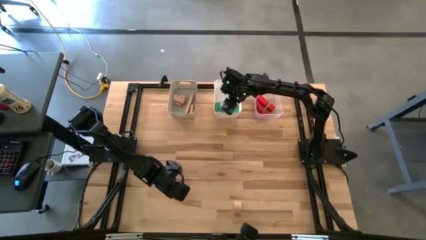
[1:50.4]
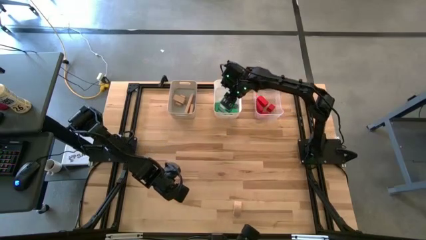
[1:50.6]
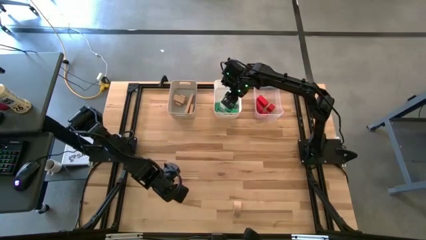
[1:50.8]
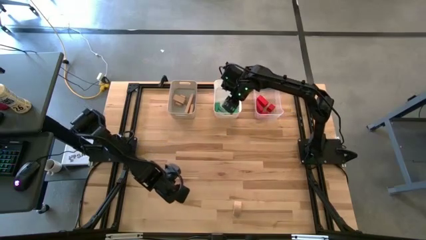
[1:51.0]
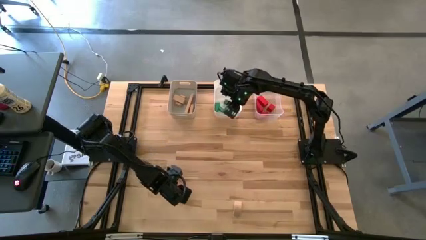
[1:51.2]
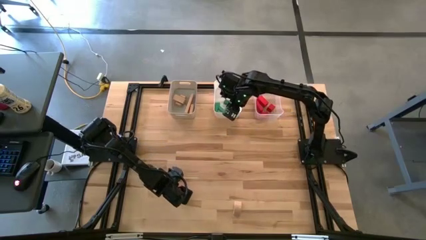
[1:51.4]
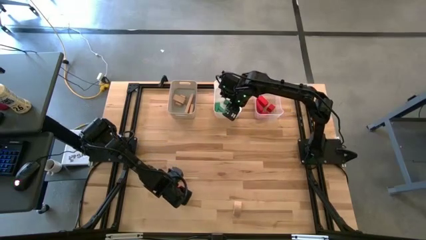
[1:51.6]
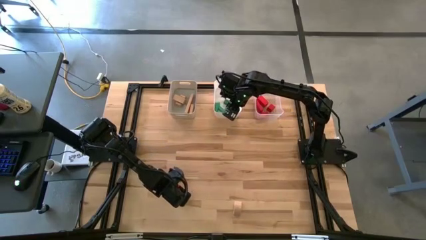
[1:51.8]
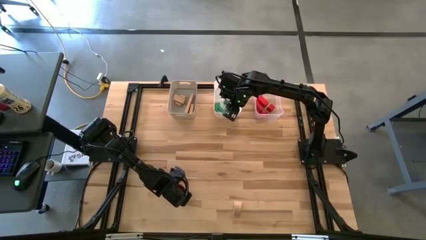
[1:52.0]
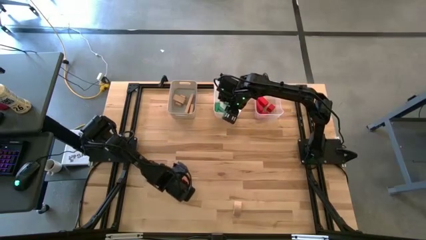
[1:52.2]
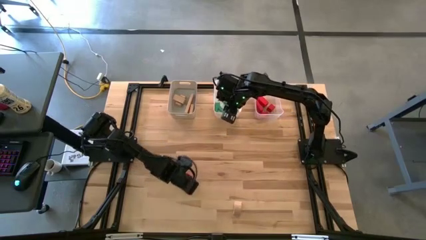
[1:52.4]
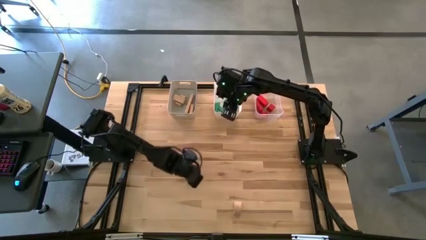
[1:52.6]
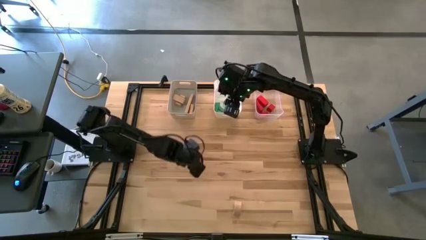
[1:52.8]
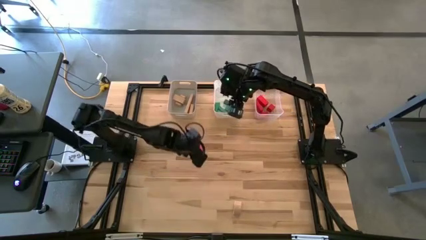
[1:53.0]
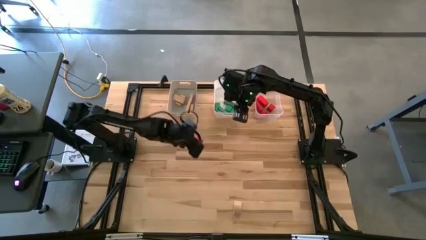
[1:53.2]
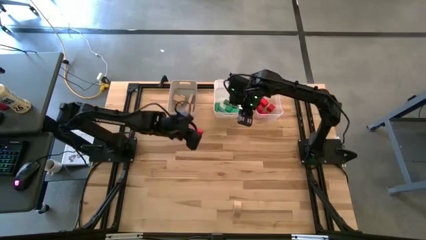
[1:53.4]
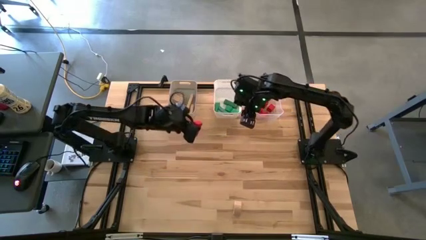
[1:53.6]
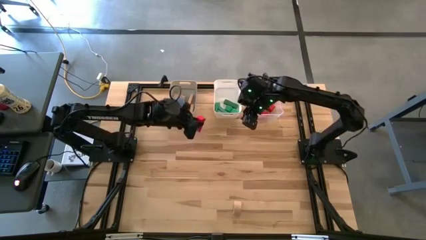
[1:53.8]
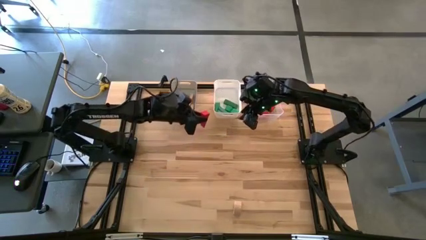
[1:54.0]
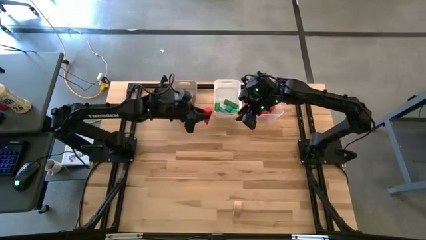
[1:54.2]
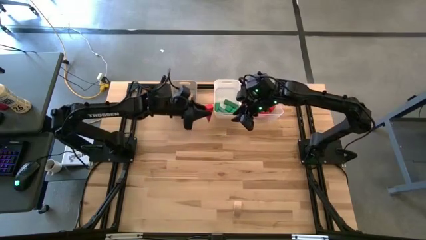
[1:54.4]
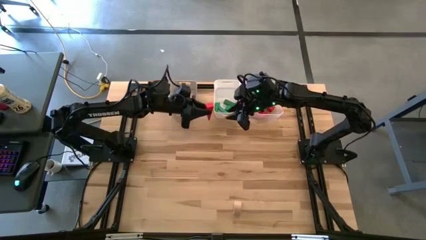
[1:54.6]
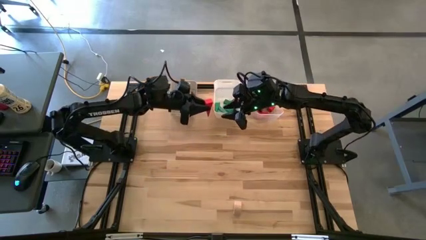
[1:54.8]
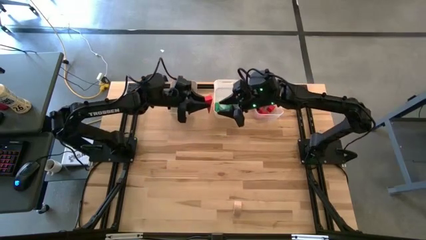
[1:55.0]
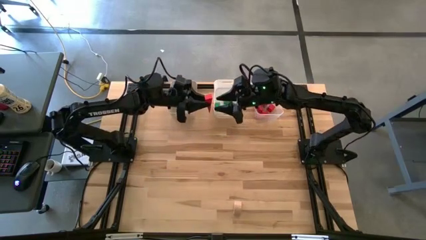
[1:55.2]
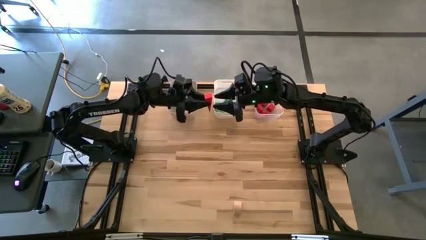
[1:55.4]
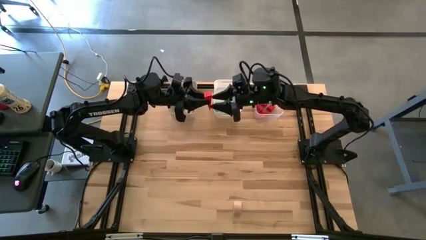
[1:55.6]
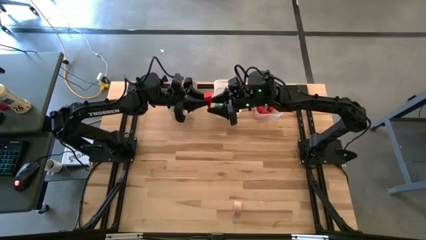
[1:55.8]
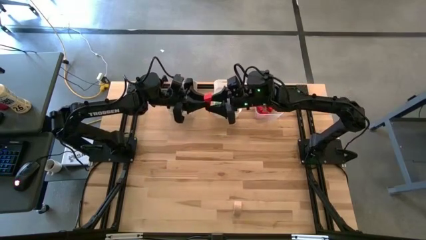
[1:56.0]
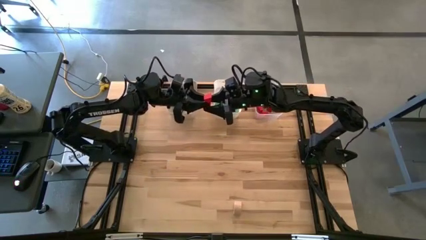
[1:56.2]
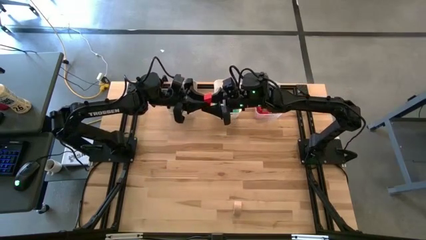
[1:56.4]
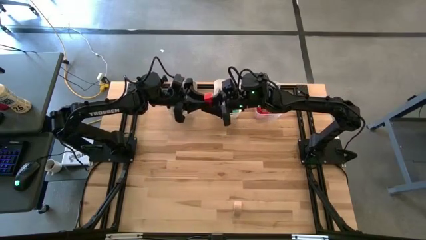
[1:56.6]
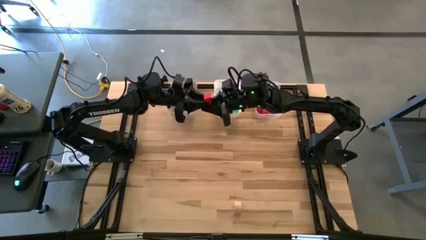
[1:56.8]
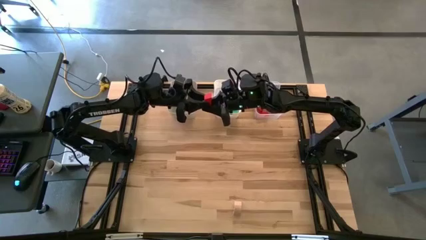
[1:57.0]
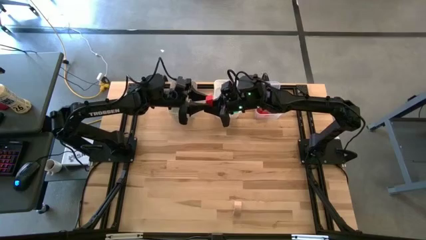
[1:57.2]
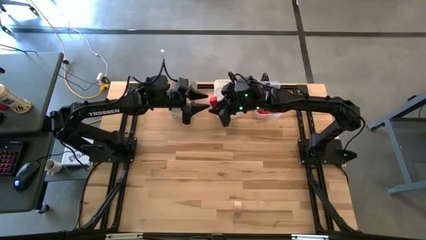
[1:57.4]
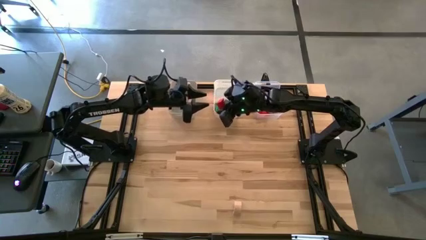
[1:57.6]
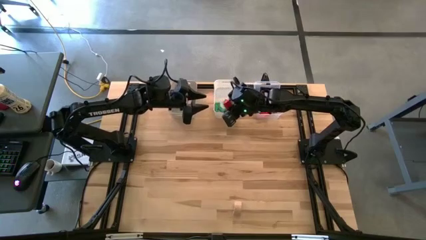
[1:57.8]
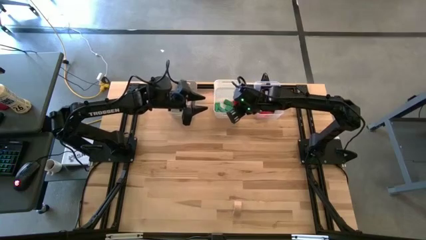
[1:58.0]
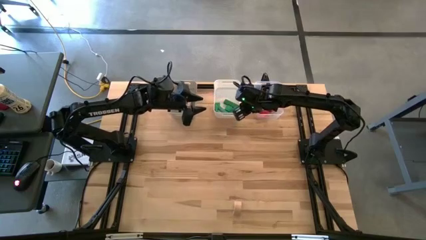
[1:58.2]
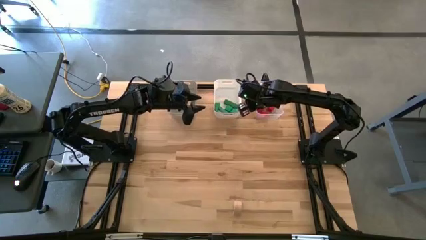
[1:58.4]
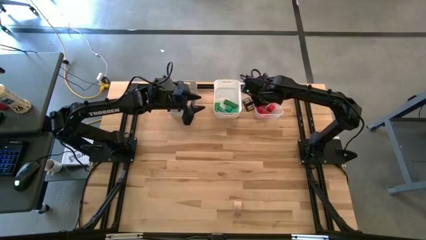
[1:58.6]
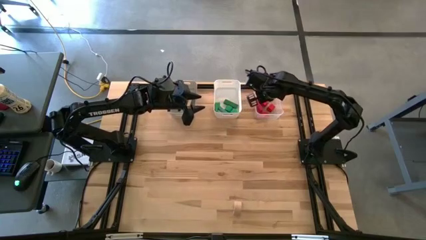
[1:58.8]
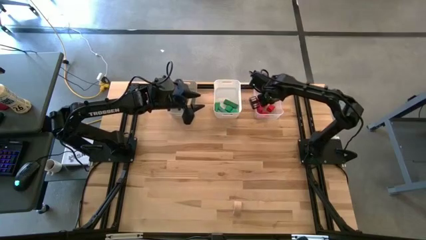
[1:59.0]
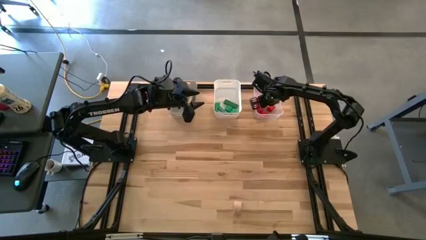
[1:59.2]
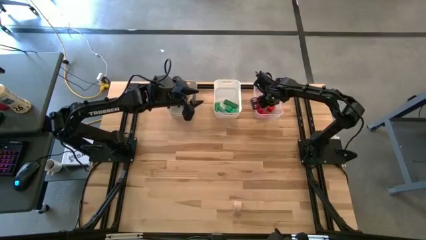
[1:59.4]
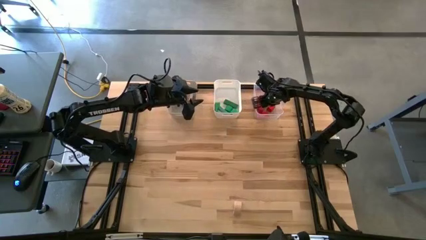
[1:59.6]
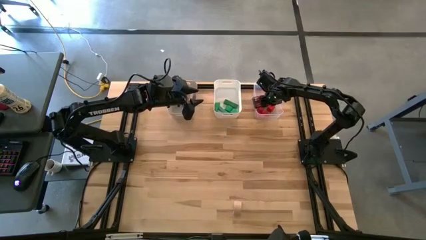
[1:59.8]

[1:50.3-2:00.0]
Task: Sort & place blocks by color
Put the red triangular block into the transparent bin

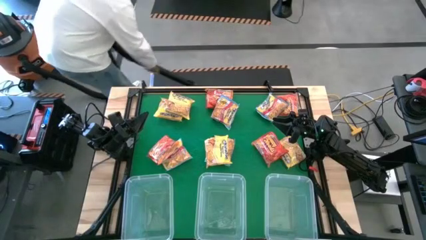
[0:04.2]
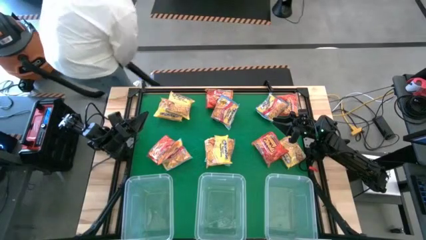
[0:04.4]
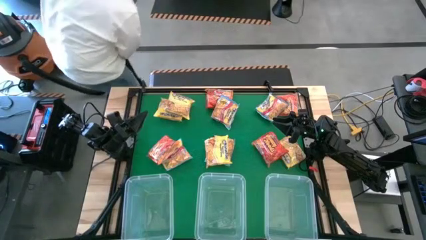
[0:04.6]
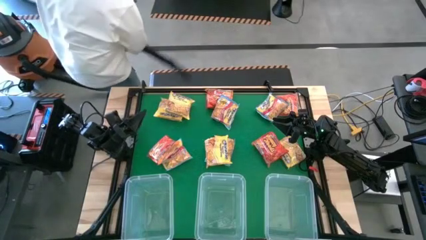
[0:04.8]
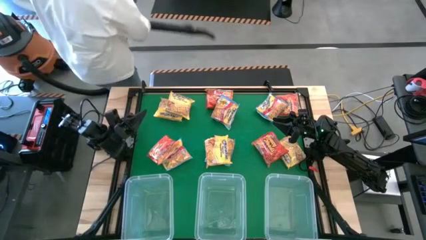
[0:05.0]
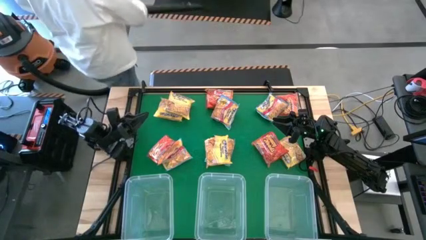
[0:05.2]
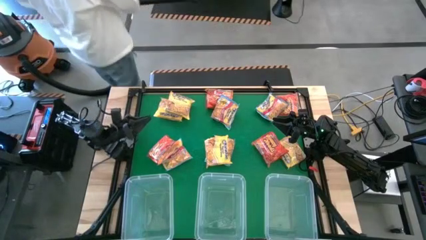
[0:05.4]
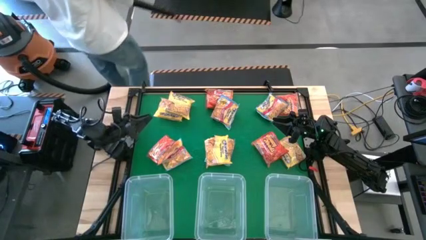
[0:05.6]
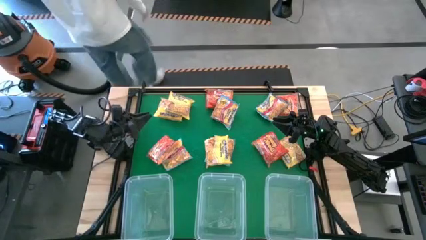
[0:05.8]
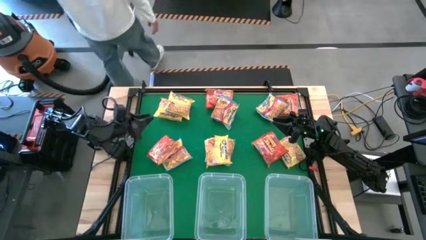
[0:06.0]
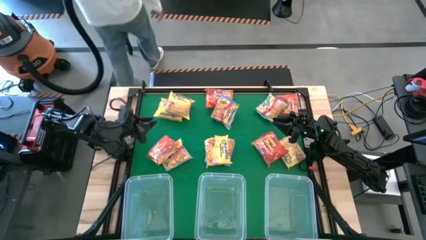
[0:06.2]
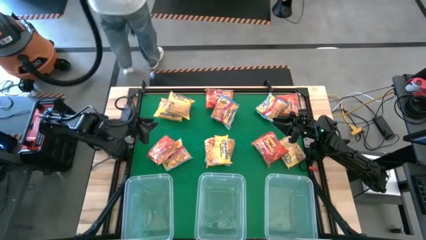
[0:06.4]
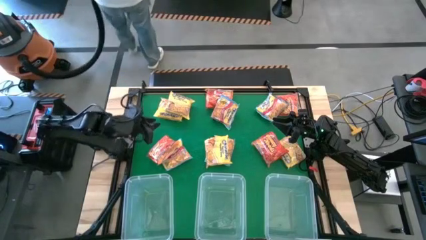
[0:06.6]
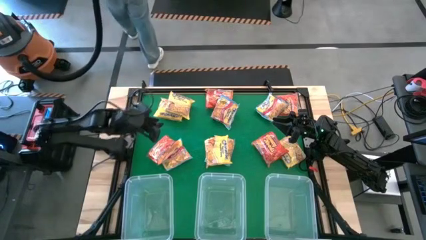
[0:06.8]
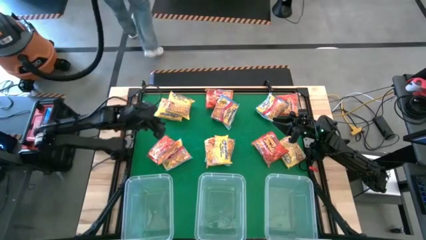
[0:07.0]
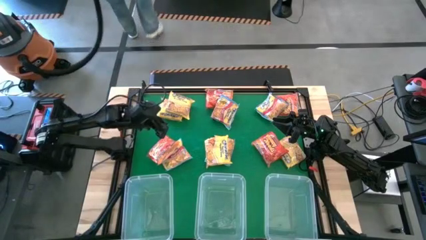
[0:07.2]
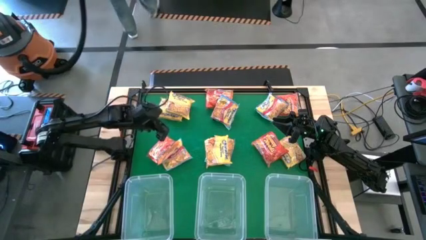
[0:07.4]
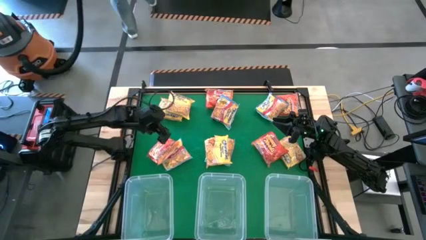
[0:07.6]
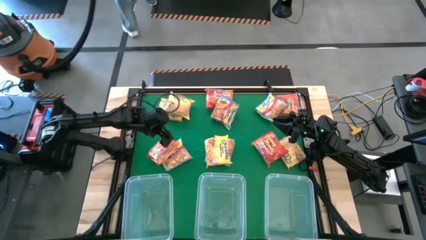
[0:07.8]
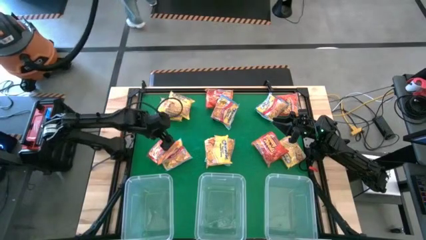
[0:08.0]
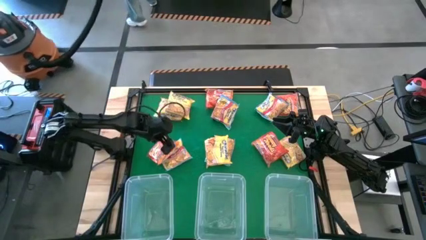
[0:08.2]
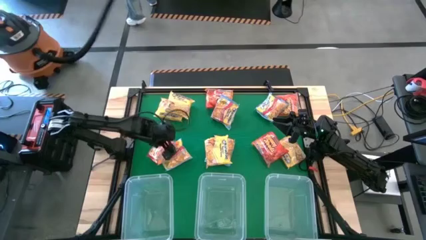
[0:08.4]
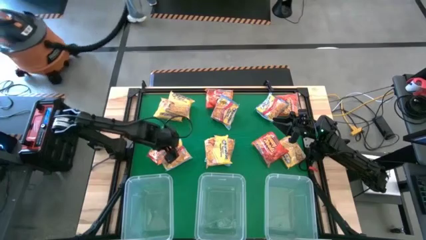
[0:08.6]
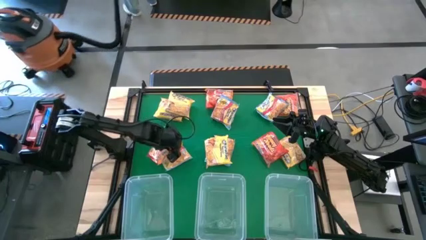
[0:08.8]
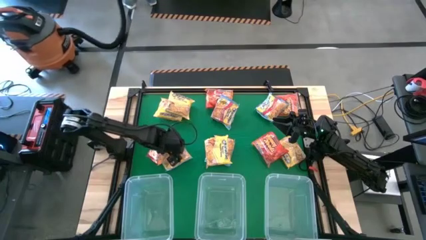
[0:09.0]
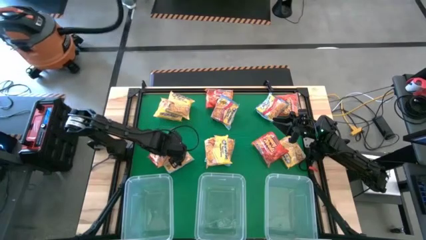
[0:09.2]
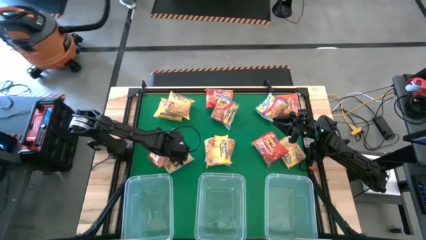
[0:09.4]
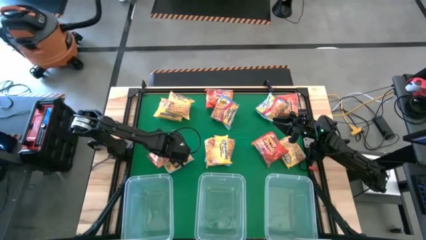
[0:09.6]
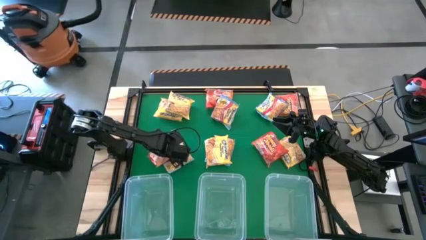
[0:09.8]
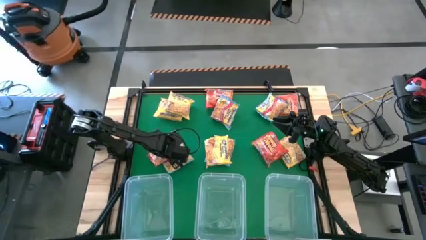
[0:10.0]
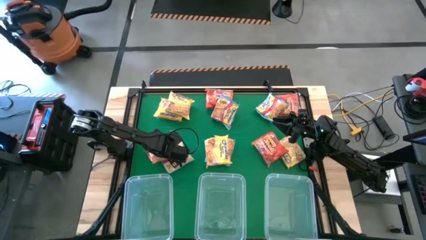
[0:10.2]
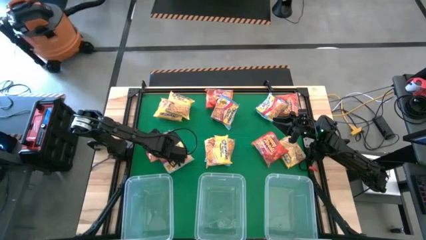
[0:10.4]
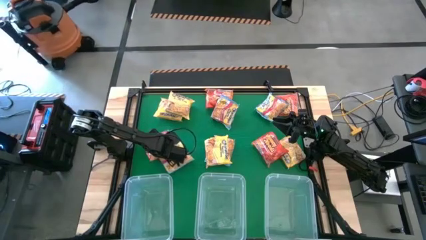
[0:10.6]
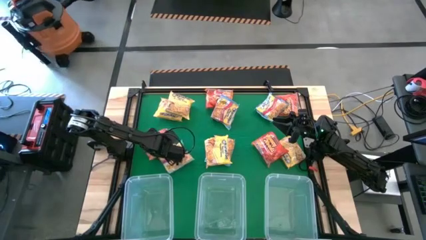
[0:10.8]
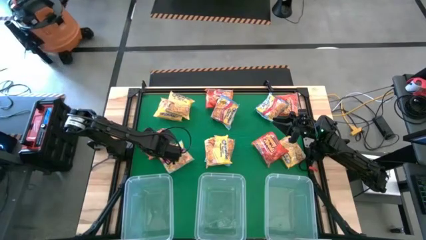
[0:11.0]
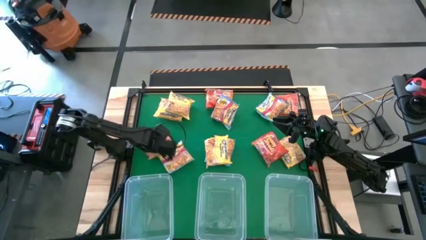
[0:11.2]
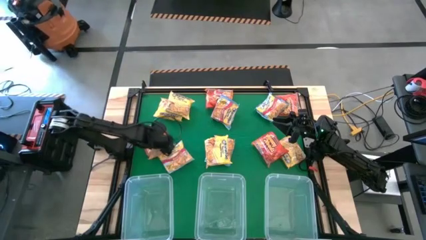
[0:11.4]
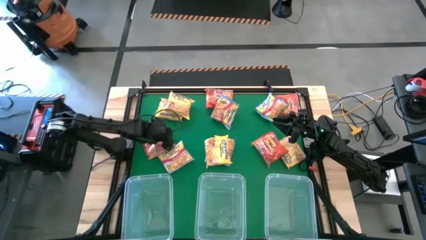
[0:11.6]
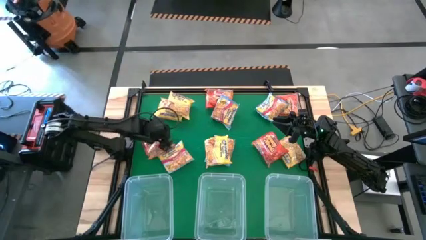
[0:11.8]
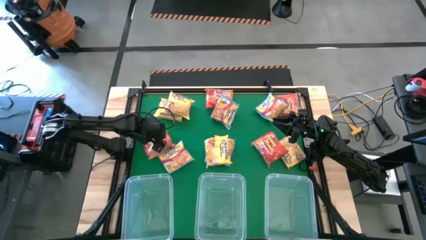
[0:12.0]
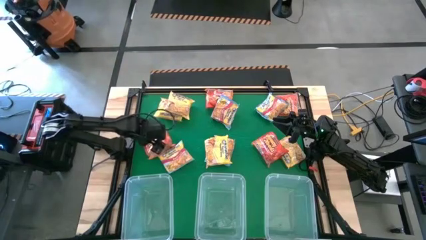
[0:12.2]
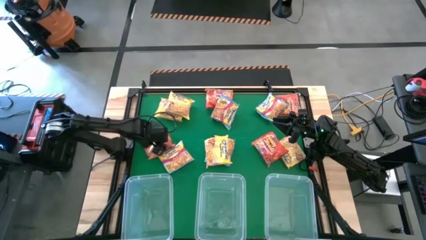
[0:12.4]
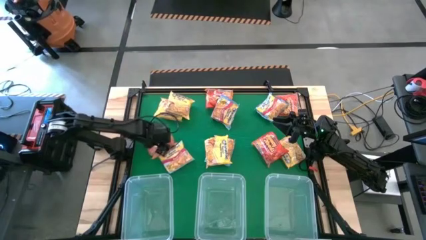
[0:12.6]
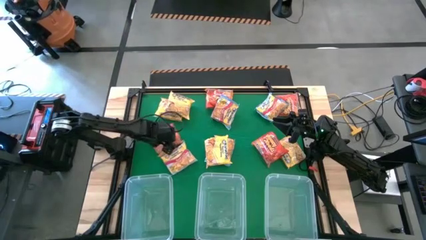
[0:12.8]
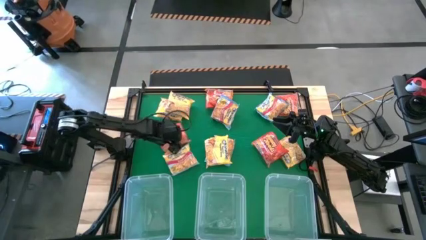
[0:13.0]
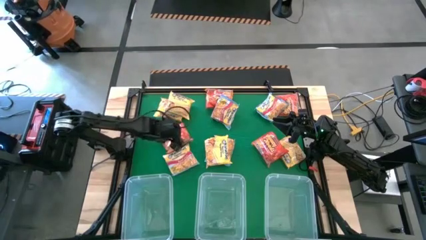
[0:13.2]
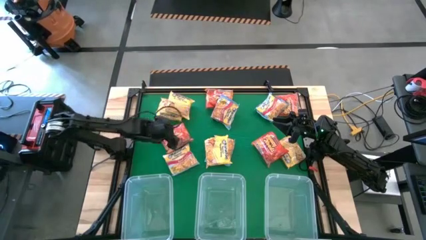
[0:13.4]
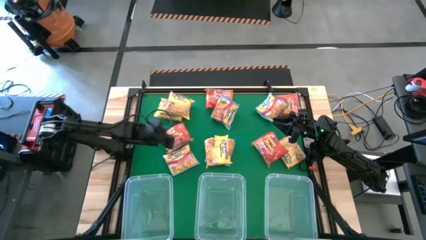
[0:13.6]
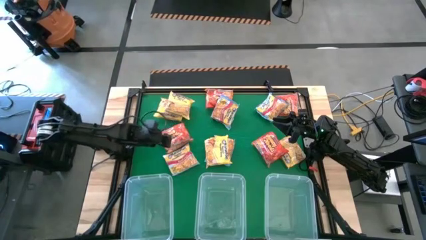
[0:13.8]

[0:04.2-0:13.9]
Task: Sort Maruchan noodles
Put the orange noodle pack into the left transparent bin
